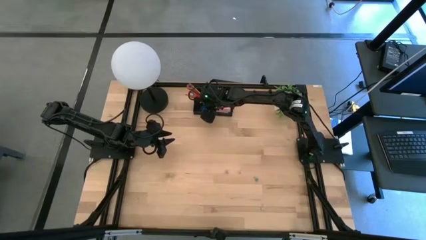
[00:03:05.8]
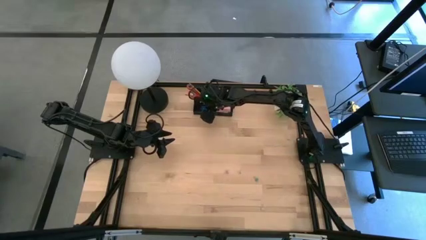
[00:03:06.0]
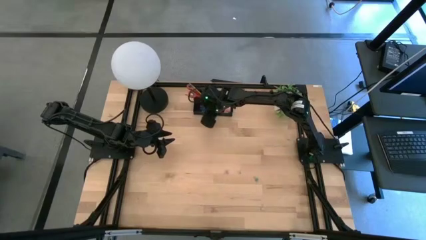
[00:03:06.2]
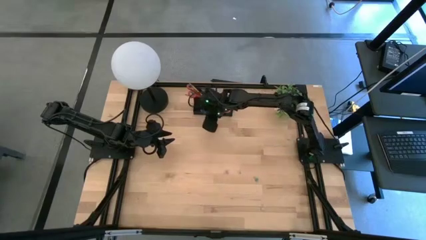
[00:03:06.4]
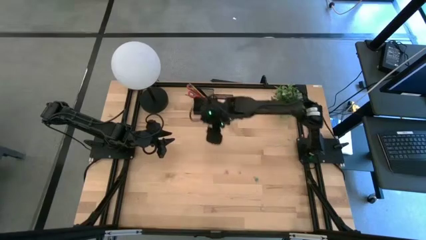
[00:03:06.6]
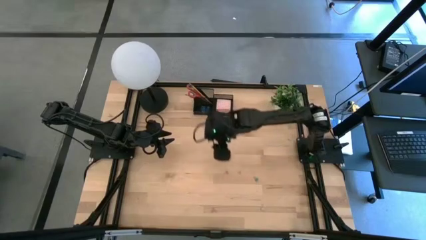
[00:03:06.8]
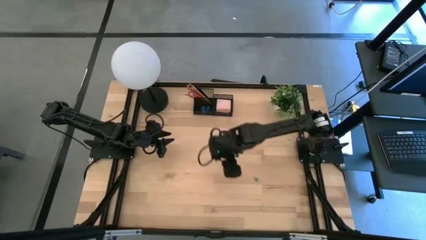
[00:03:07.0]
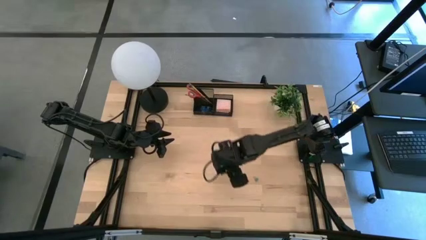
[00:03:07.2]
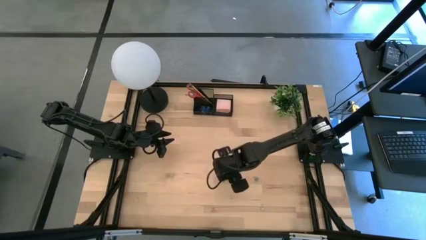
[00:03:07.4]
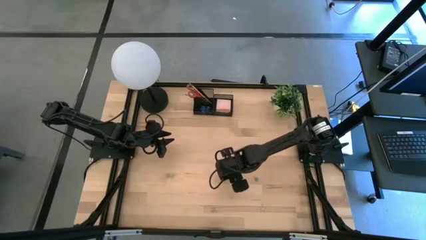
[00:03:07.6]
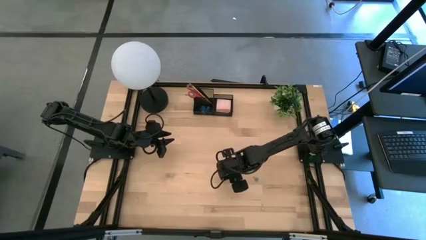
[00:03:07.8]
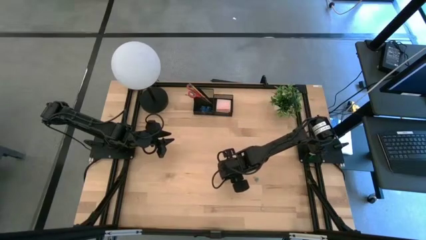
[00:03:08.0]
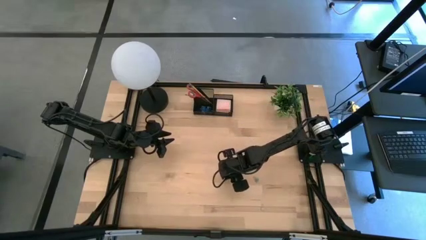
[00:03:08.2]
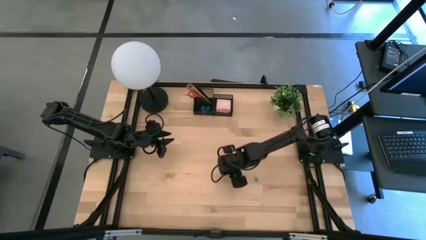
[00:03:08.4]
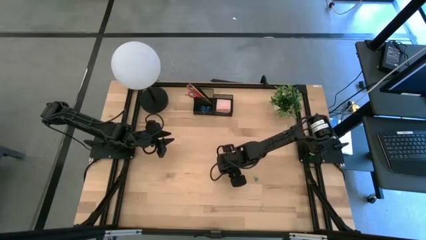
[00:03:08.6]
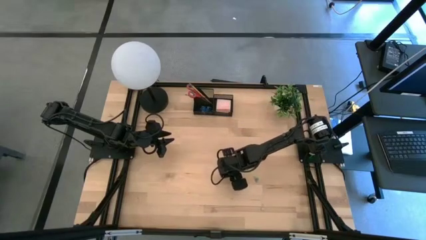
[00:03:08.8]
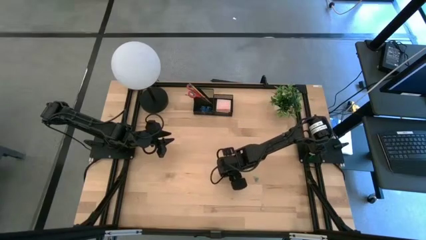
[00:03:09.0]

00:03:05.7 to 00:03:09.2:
Task: Pick and place office supplies into organizer
Put the pink binder clip into the black desk organizer

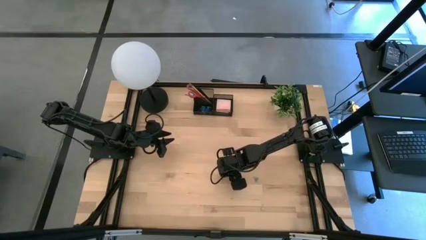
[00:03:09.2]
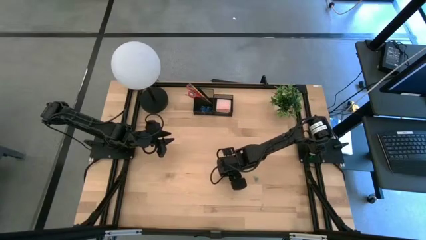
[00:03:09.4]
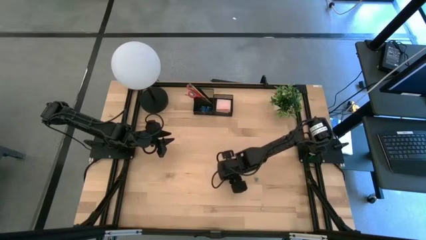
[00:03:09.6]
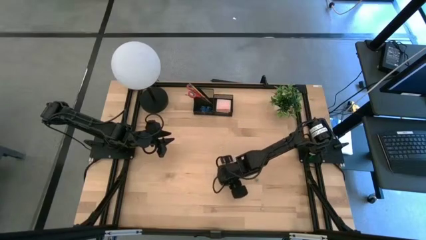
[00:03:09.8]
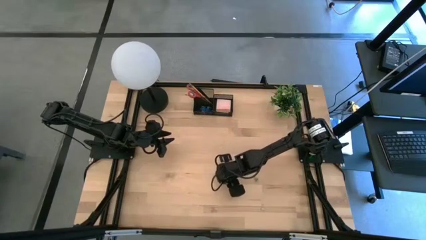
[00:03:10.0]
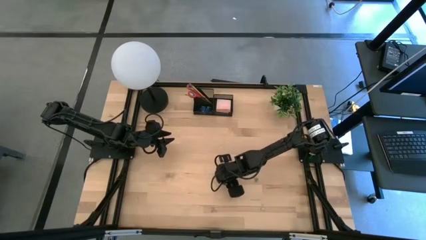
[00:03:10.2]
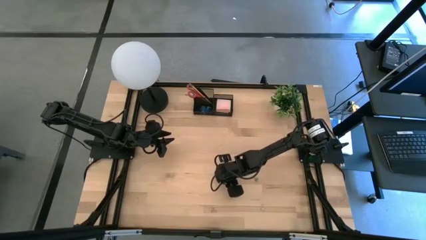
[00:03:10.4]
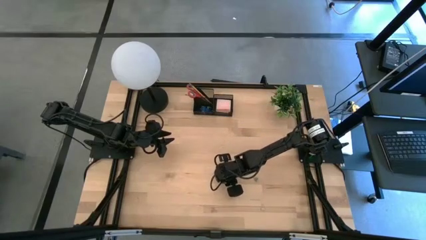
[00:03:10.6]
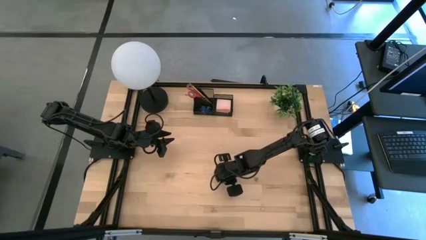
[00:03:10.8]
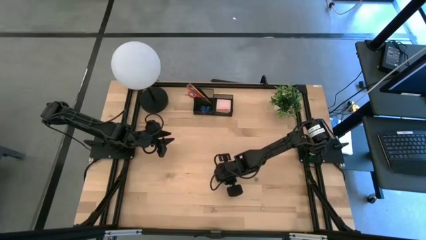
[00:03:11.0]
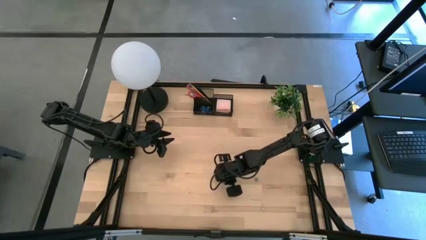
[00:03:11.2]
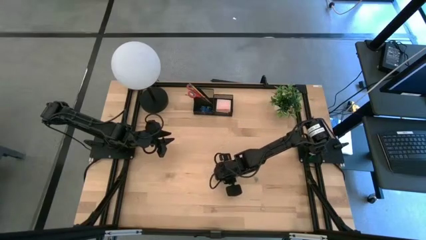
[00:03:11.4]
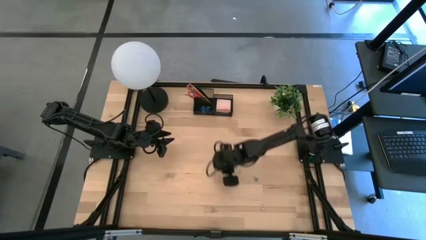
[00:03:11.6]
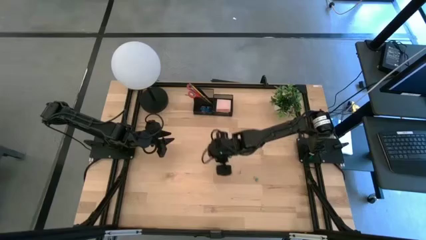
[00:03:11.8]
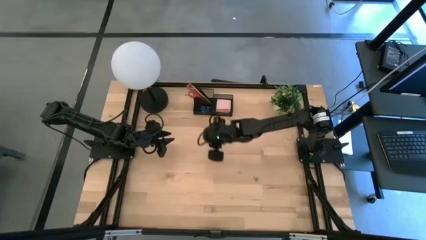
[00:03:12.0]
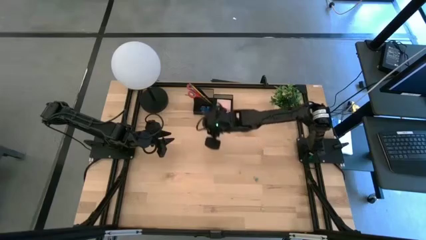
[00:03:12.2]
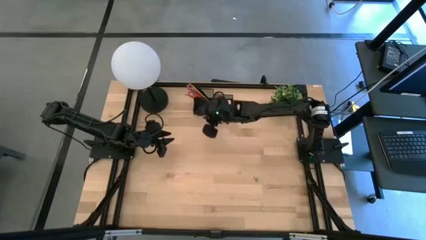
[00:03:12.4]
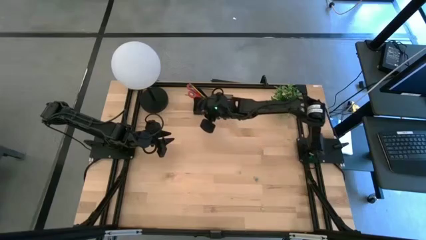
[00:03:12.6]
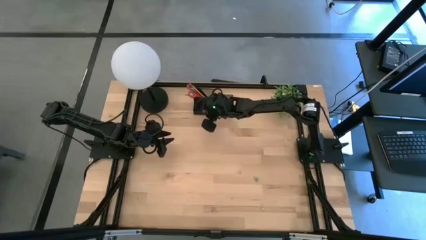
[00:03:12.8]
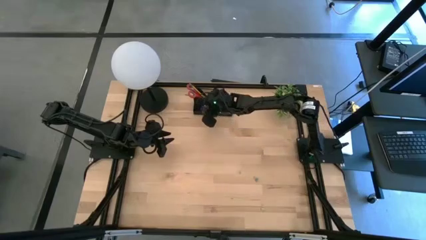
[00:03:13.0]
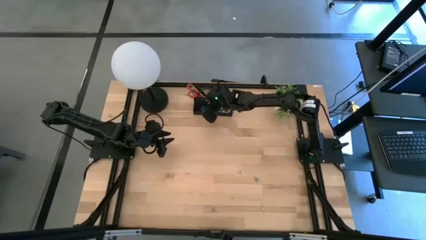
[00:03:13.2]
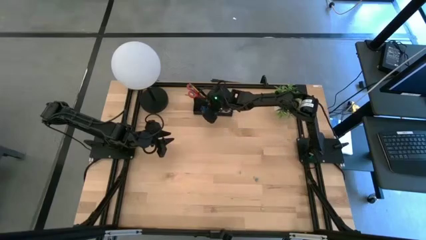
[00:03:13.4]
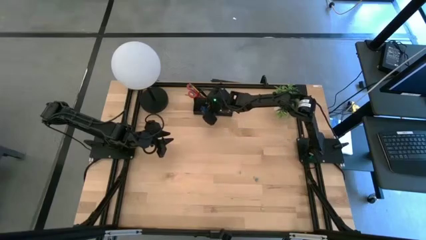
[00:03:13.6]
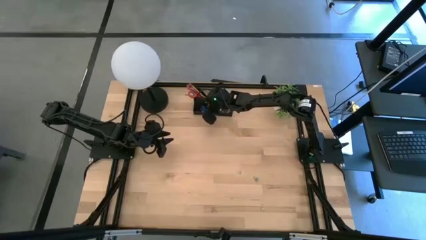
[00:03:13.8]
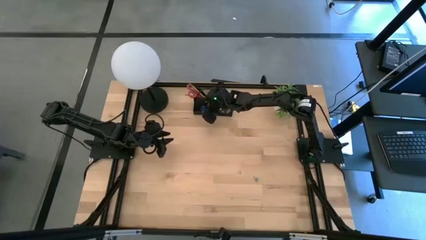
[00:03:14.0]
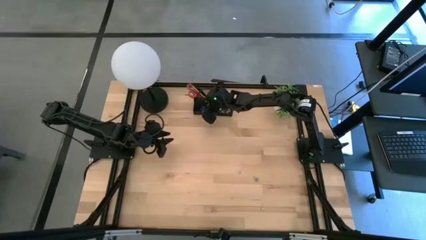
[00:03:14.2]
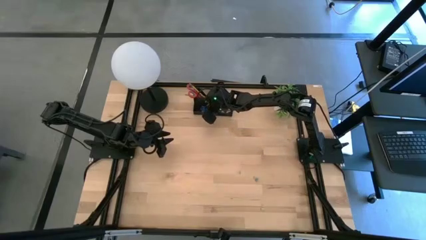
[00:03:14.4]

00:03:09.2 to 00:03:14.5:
Put the pink binder clip into the black desk organizer

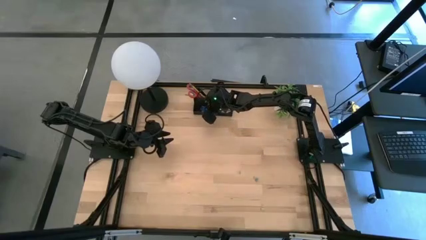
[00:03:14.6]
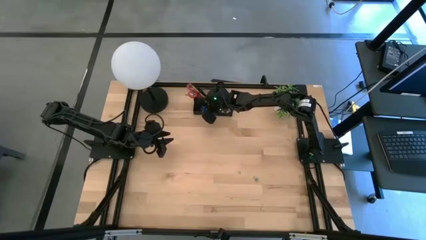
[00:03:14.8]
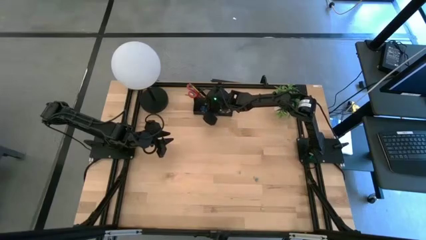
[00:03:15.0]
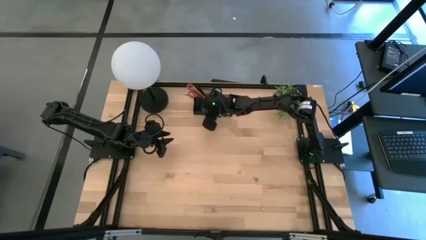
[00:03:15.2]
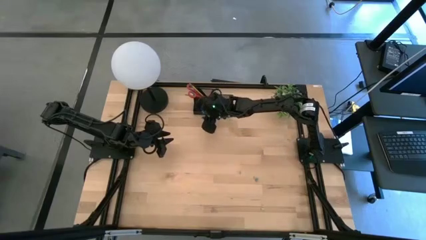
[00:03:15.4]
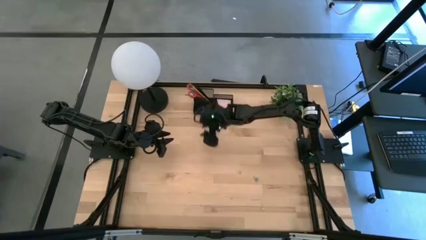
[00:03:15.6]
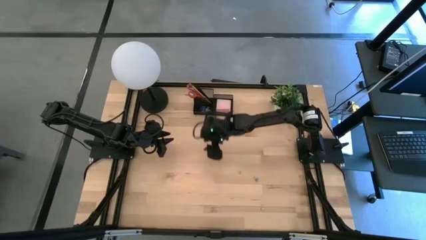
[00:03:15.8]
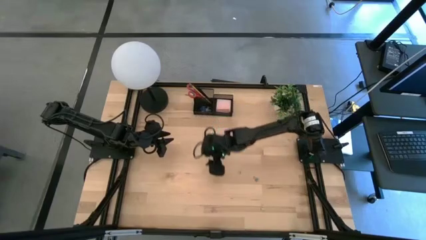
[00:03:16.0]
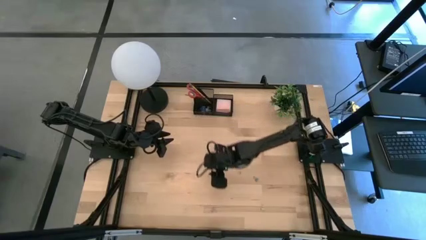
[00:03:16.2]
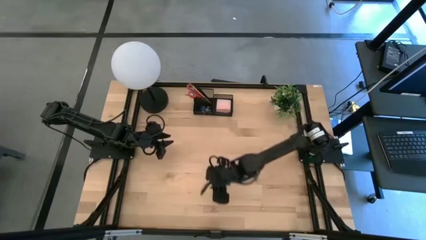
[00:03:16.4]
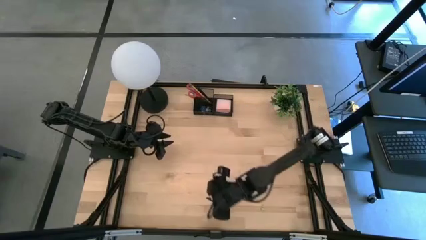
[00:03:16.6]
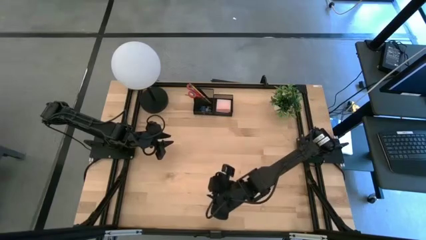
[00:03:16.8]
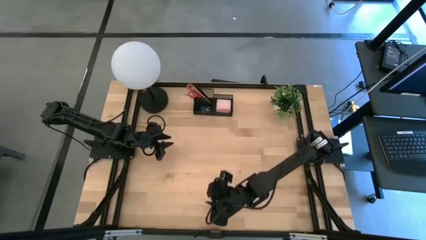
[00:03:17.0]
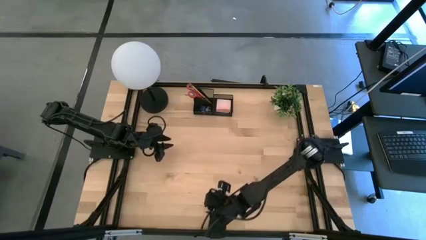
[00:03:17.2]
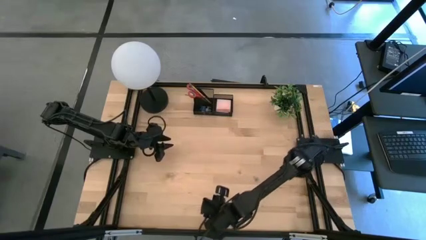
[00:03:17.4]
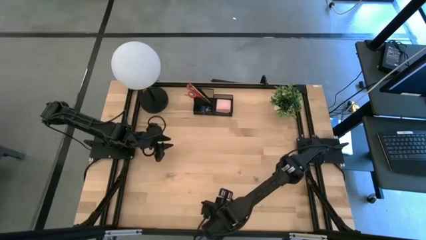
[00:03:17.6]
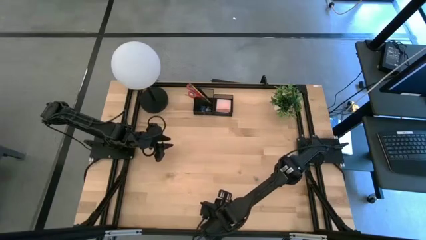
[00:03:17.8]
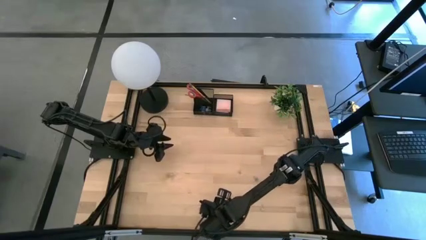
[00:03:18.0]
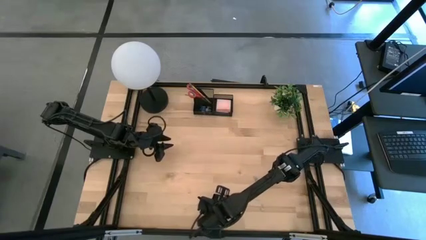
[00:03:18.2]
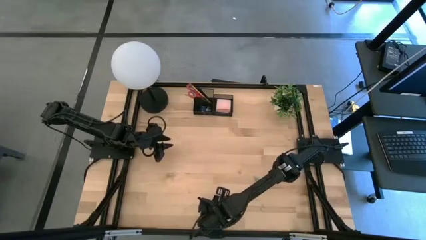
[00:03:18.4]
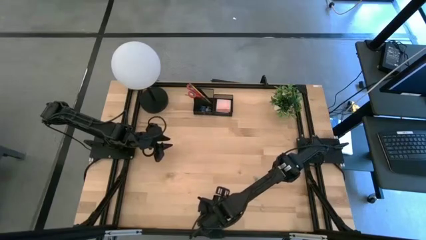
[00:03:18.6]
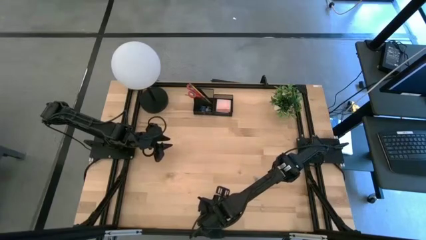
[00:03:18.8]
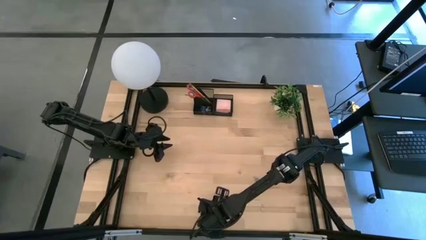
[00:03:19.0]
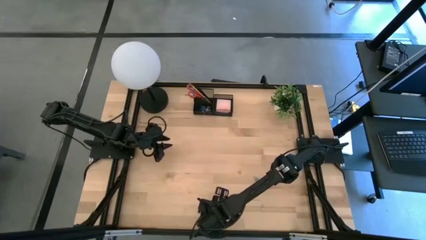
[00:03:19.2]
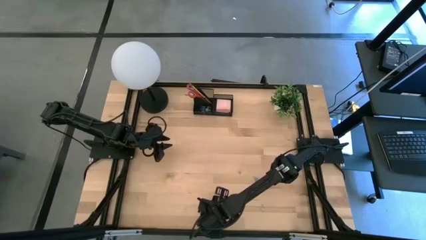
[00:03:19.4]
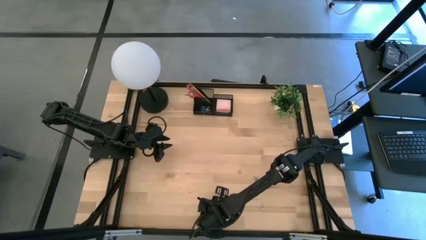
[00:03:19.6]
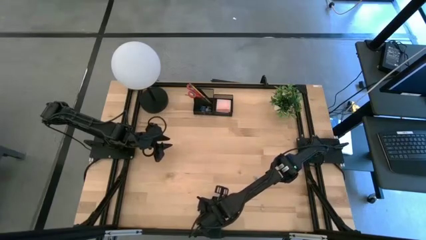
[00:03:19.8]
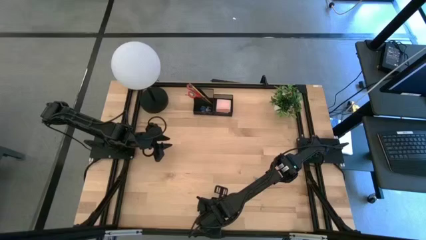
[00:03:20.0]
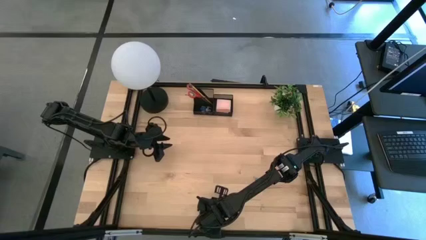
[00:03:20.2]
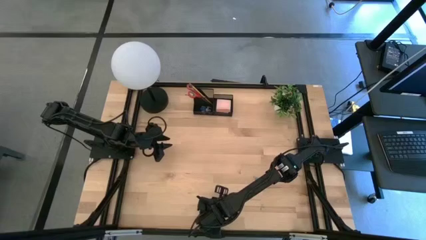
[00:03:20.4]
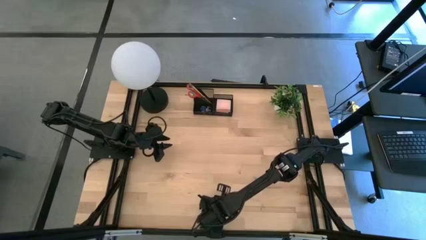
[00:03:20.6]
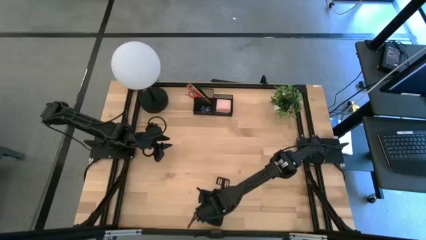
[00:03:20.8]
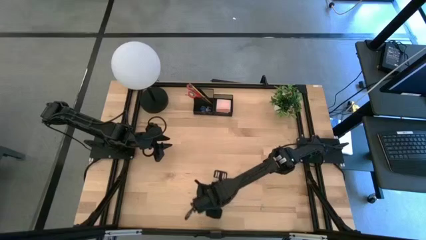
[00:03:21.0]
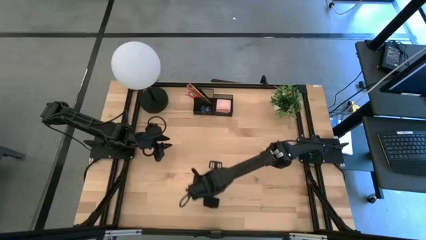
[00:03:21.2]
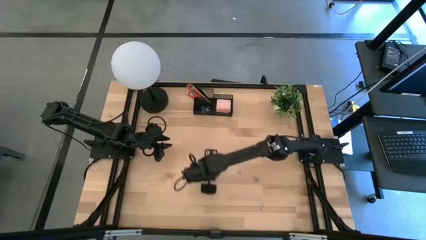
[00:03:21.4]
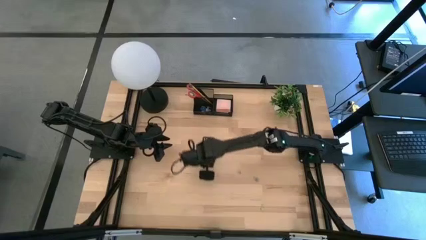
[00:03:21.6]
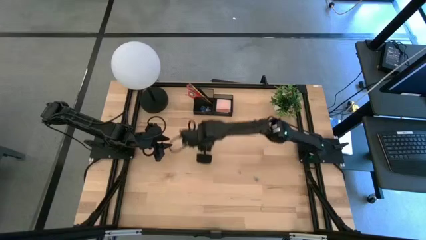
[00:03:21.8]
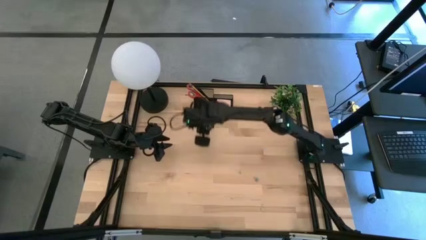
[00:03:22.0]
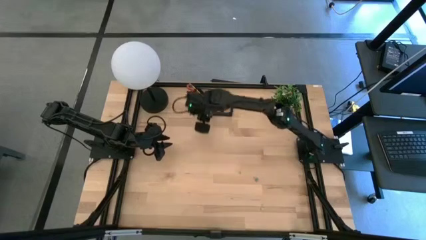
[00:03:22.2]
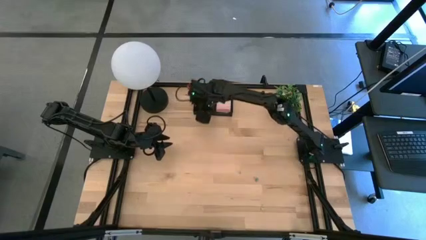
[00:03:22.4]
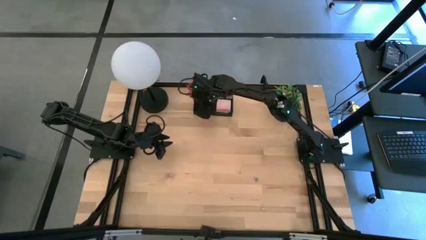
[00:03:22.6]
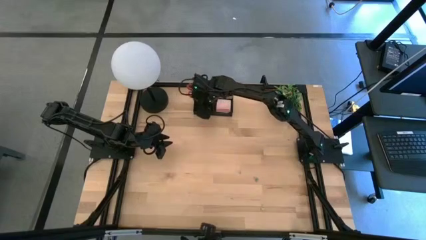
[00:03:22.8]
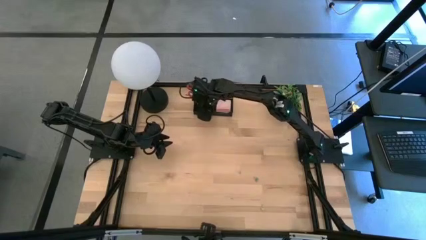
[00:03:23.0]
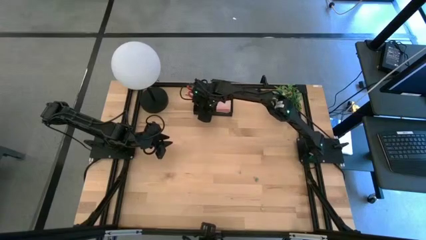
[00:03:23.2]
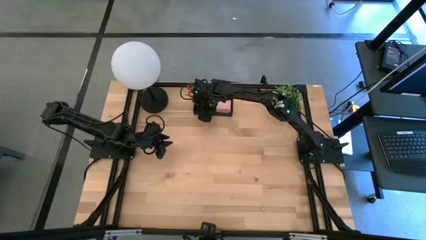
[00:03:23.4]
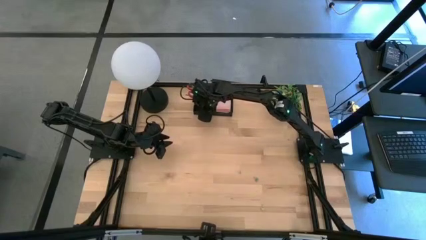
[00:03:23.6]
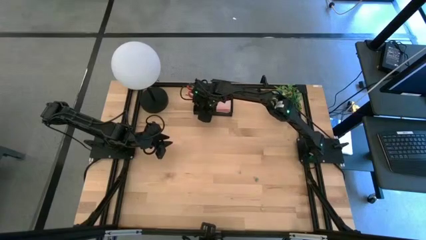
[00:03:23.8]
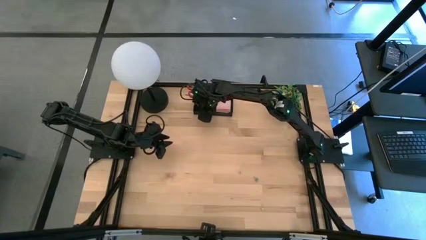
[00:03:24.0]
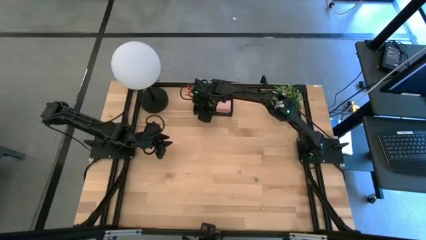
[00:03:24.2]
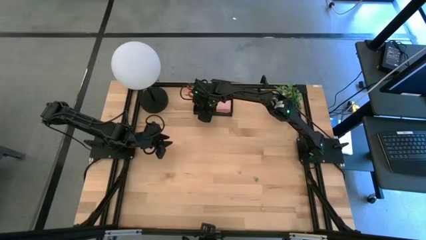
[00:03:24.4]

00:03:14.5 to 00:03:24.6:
Put the pink binder clip into the black desk organizer
